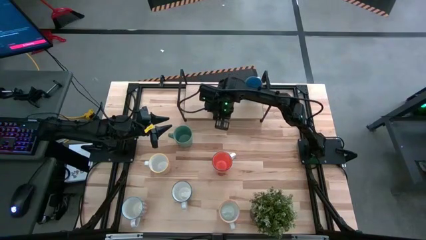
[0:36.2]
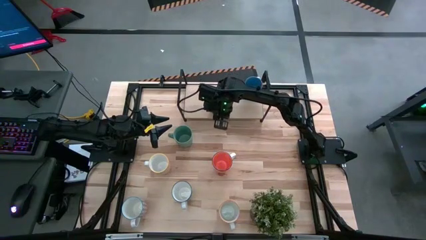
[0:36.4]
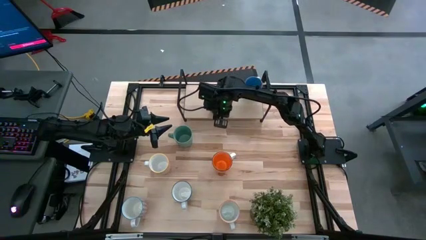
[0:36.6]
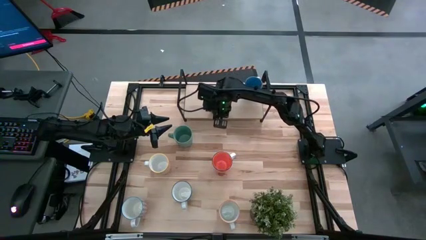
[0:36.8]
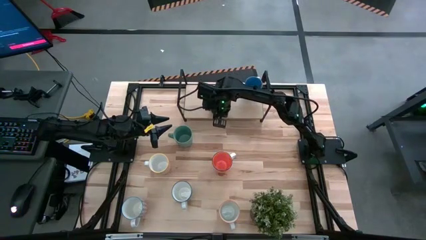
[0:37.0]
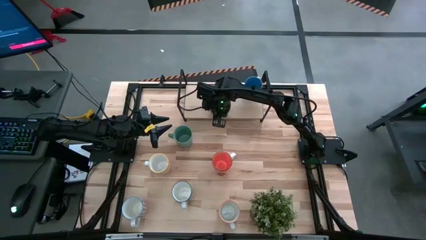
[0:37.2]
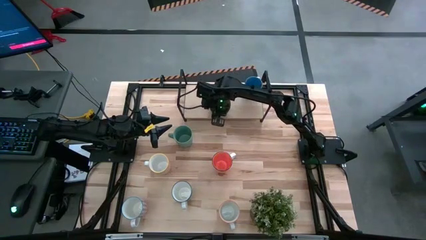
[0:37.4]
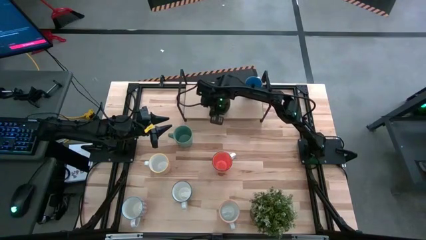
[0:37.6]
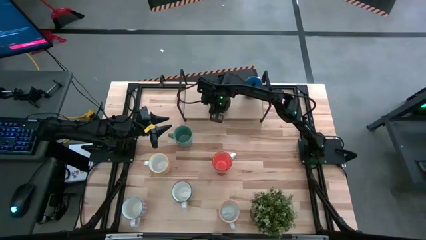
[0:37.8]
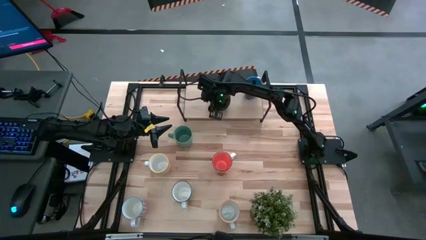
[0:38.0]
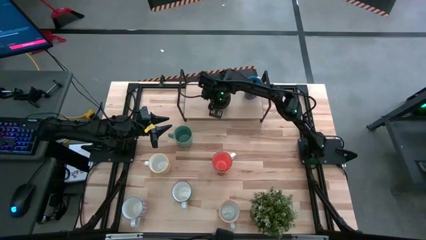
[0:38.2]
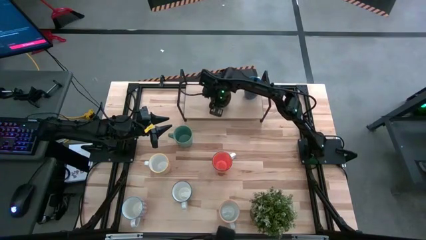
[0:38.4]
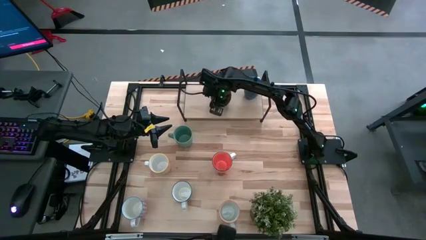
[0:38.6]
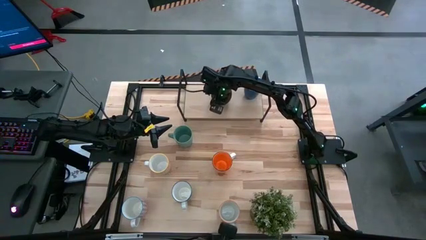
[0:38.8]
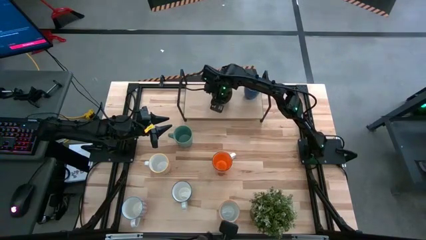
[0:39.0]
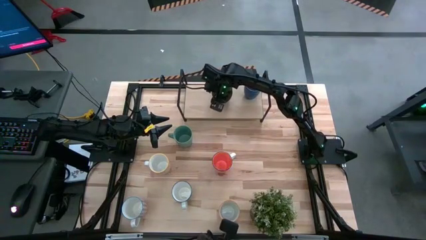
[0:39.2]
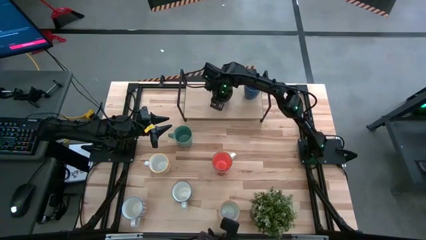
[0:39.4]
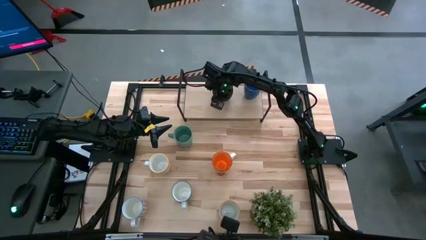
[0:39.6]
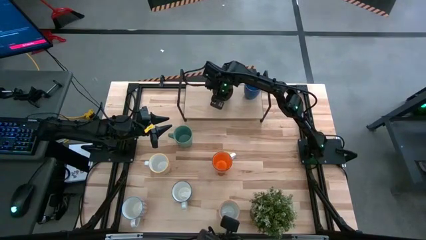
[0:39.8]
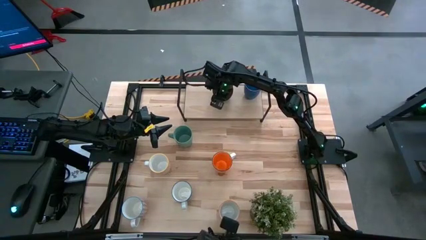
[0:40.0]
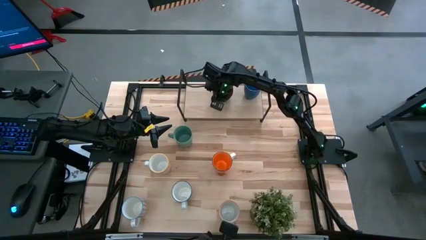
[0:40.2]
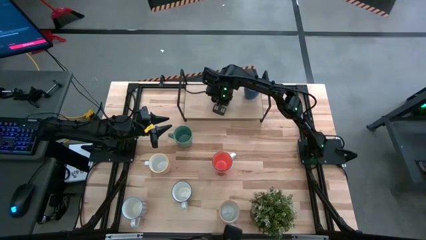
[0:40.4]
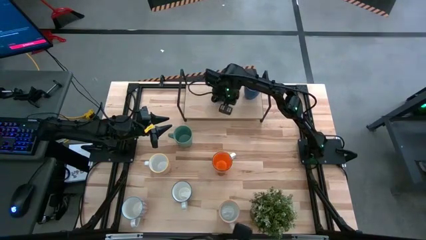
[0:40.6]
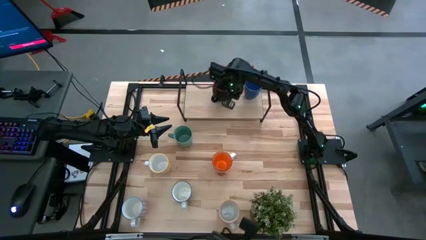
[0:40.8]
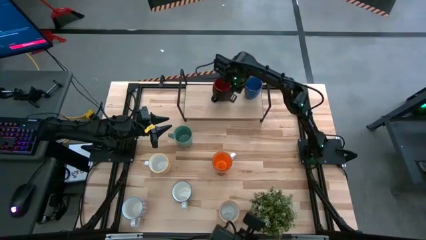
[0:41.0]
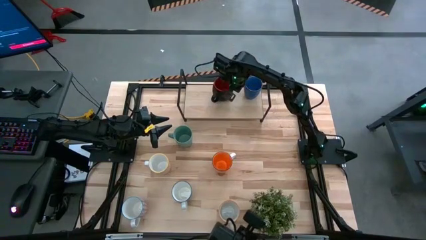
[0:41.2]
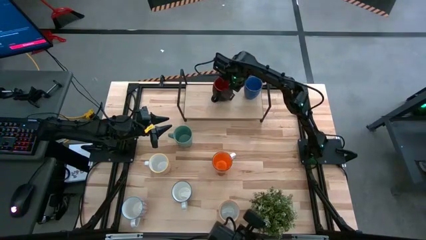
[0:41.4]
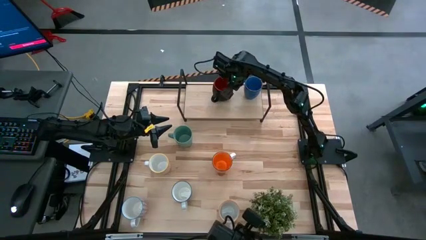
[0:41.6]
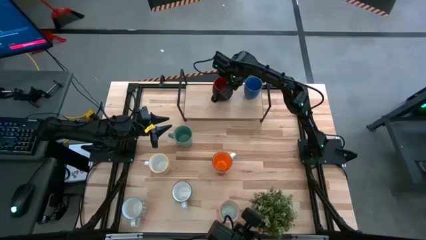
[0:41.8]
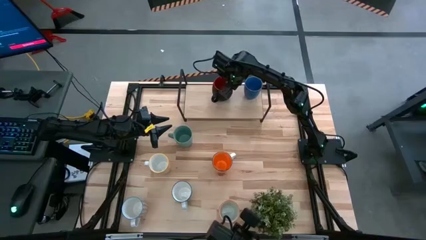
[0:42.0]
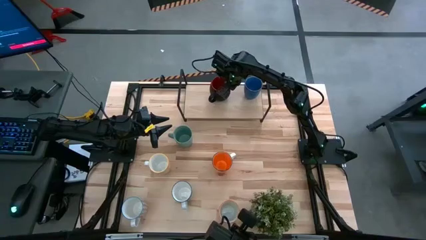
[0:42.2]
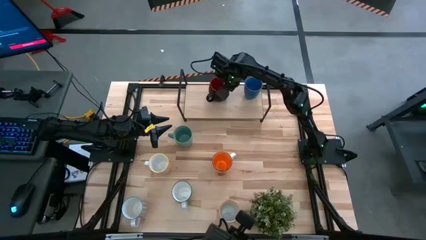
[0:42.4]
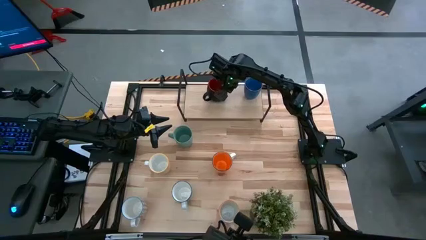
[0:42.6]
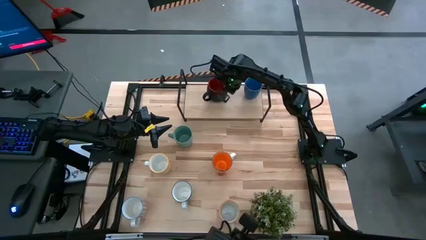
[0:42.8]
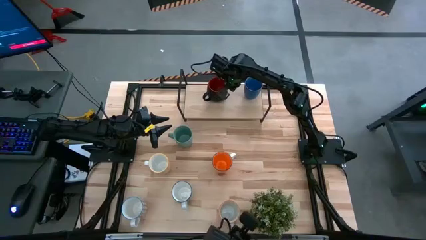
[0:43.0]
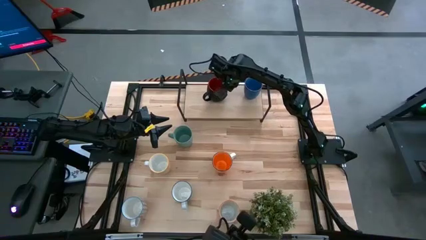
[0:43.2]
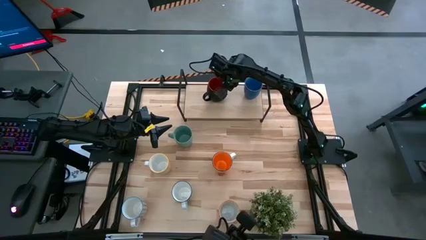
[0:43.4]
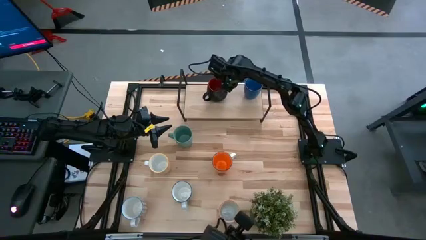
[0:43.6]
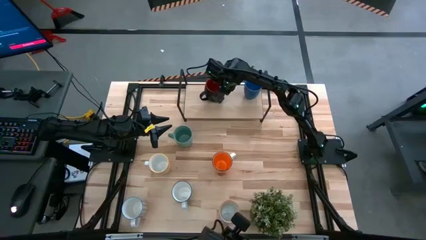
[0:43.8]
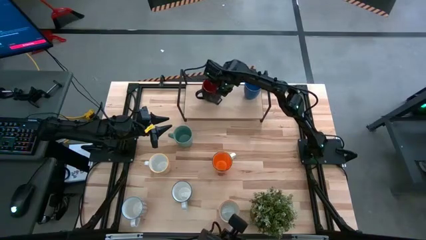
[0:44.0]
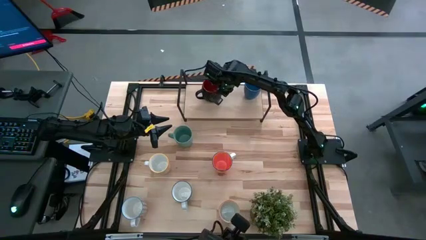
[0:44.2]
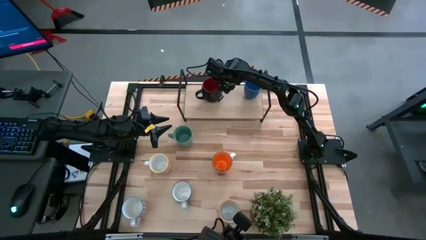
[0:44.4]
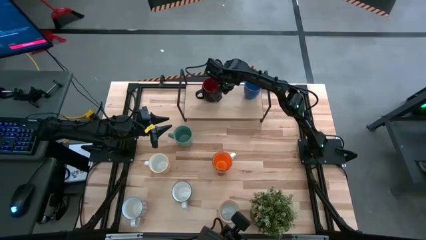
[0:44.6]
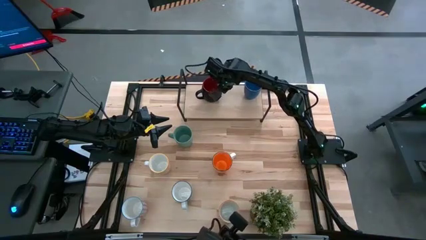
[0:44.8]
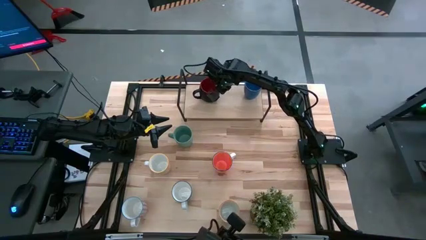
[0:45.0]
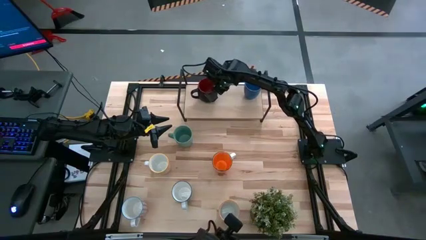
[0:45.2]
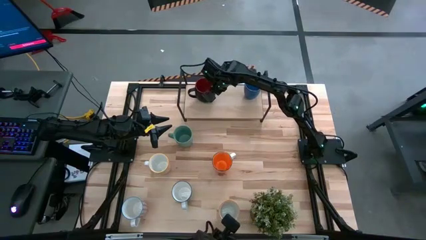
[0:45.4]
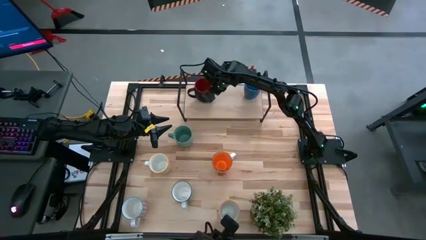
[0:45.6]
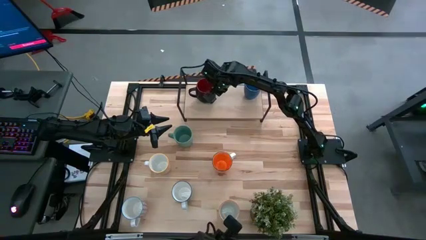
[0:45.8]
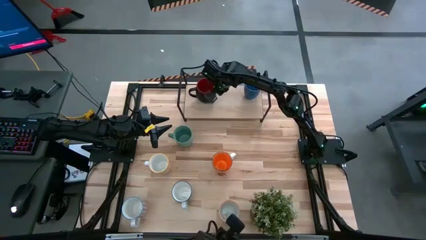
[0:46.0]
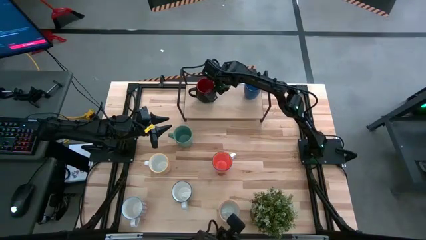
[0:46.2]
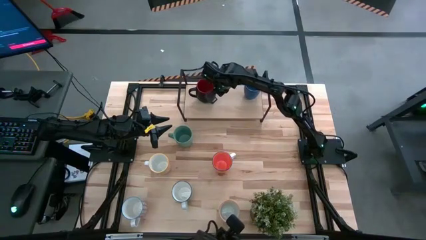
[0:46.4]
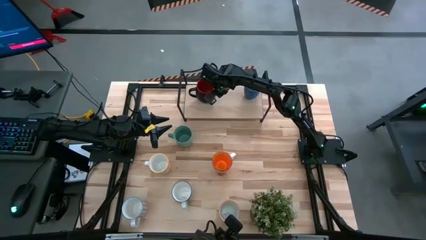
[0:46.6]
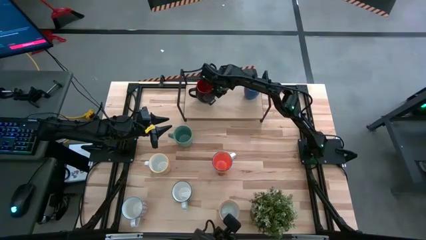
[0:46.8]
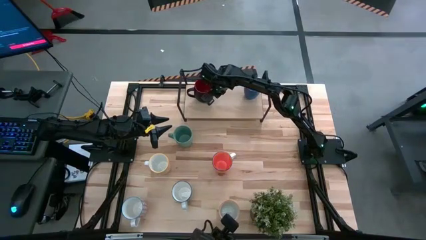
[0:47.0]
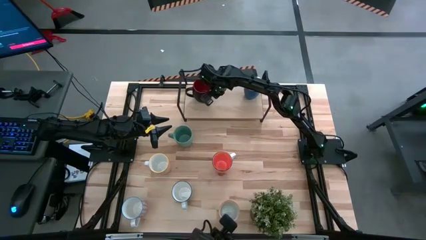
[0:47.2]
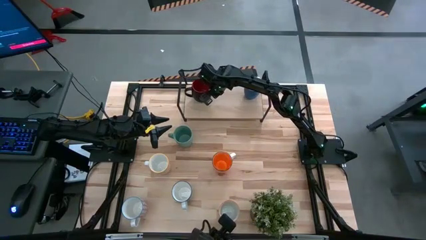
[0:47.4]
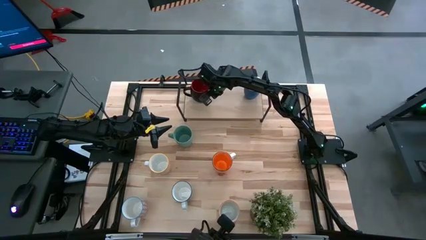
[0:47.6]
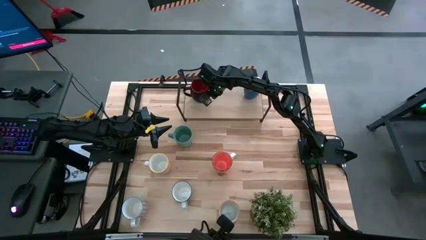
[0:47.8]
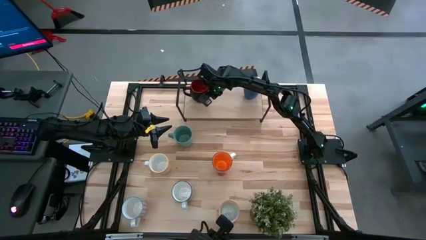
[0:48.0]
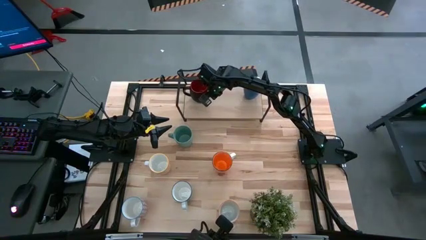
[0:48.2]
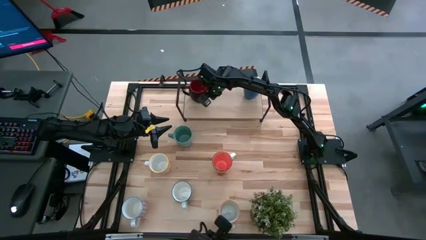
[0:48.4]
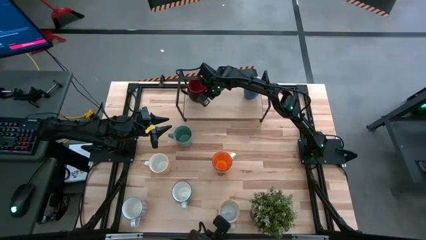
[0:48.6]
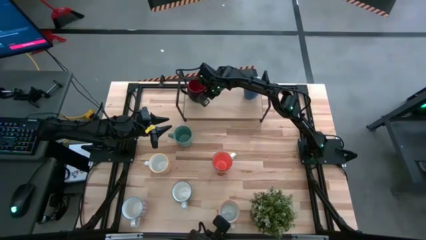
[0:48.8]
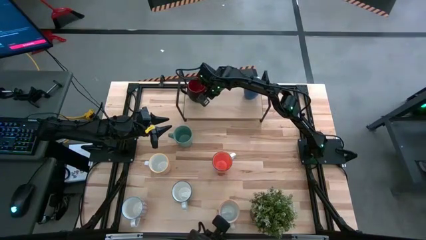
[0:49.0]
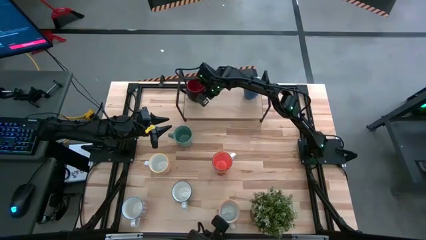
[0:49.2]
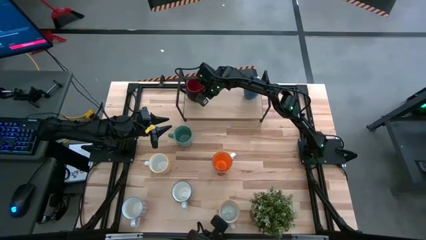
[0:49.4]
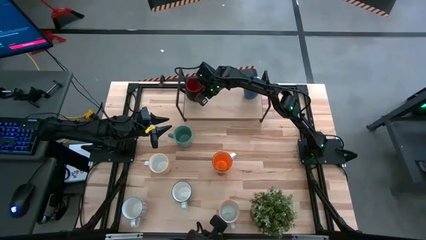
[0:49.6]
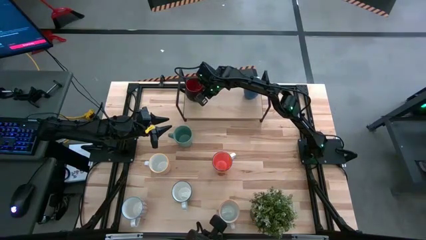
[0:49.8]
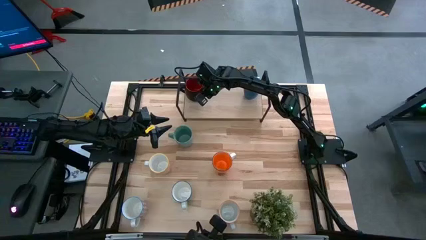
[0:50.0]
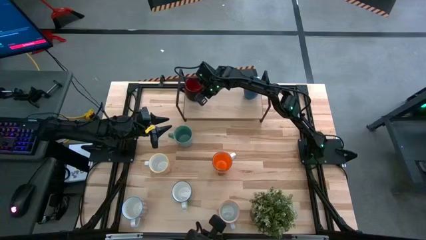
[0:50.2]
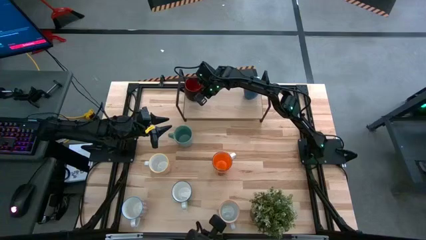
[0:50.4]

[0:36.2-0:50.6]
Task: Place coffee mugs
Put the black mug on the shelf

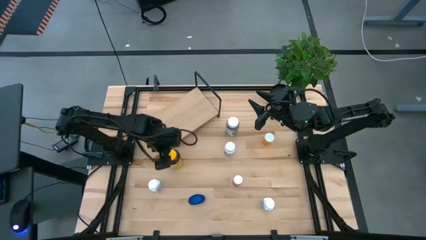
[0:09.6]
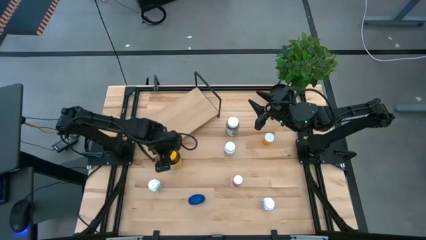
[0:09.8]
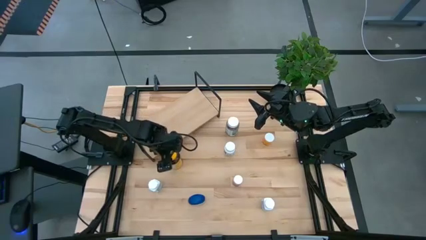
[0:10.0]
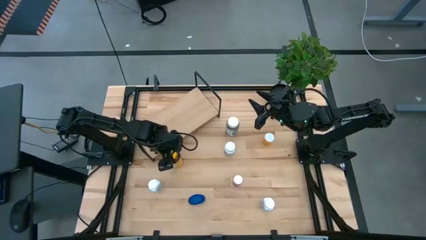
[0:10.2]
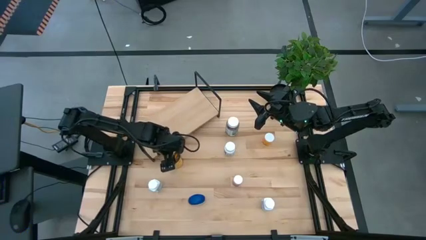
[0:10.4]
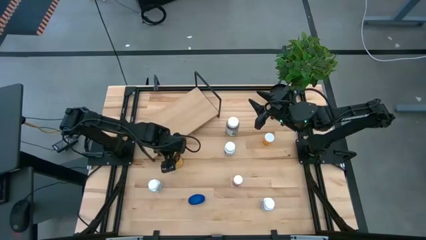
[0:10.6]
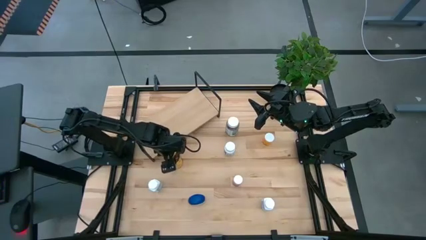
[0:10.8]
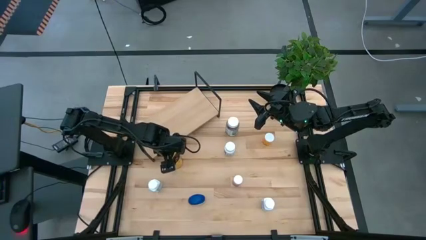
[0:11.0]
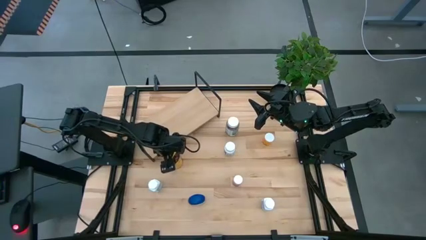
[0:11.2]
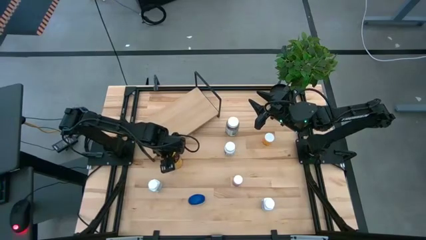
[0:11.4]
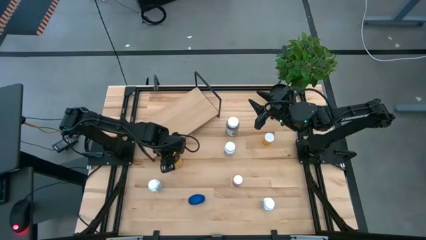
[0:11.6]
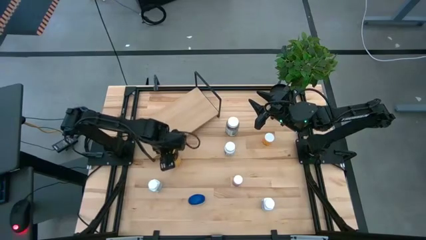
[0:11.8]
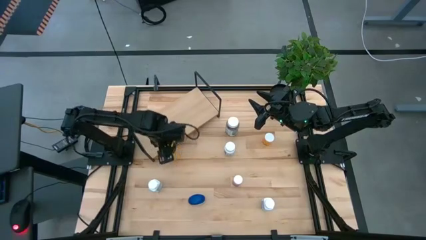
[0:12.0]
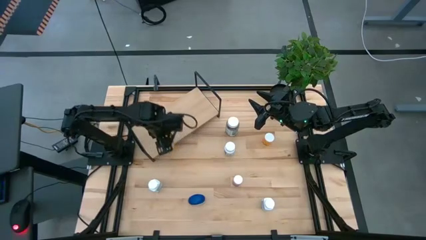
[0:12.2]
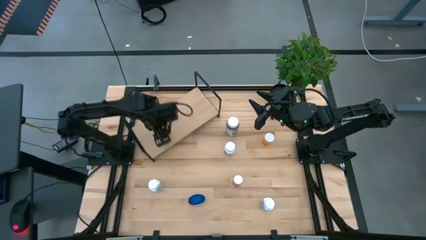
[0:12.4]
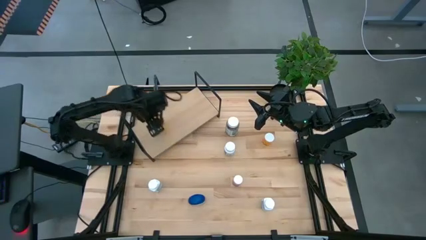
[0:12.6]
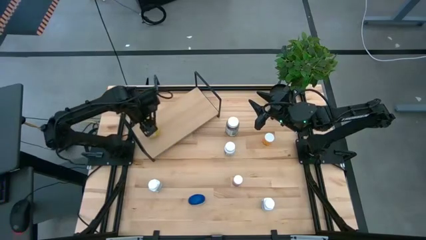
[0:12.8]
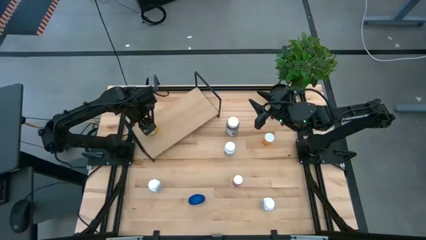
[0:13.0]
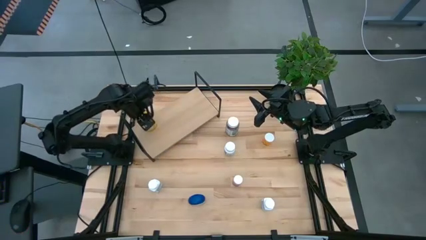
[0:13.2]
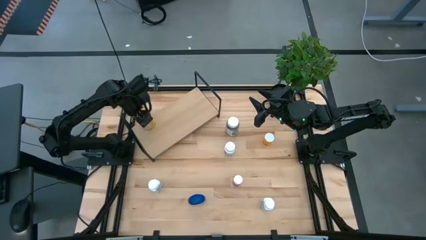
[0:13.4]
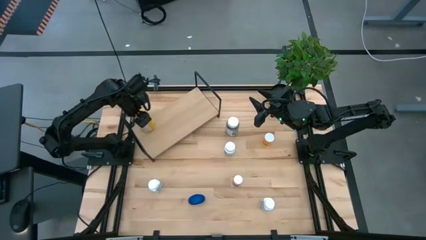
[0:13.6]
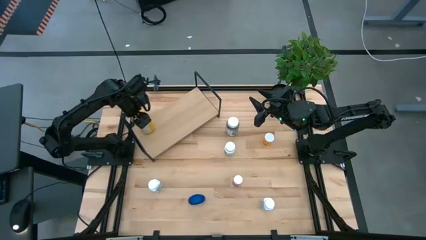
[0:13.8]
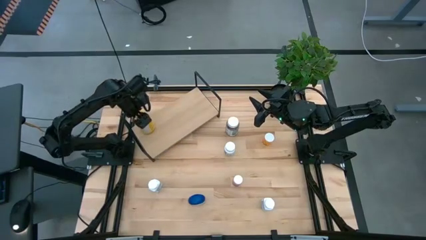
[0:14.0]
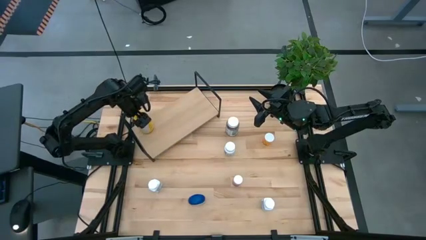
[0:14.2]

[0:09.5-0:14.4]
Task: Pick and place medicine bottles onto shelf by color
Put the yellow supplement bottle on the shelf
